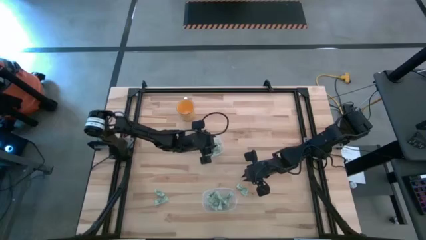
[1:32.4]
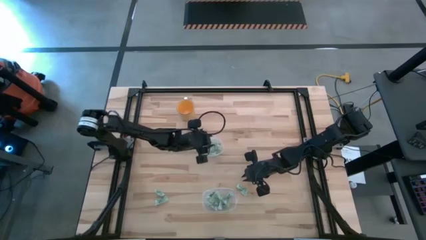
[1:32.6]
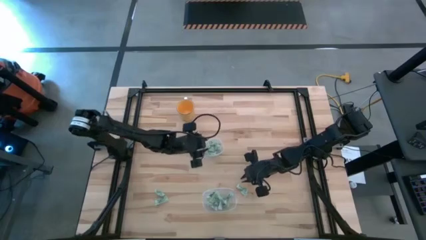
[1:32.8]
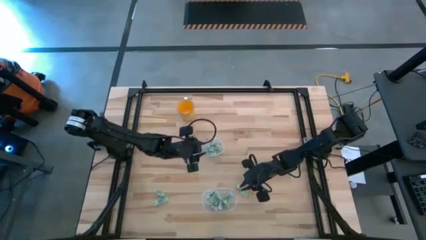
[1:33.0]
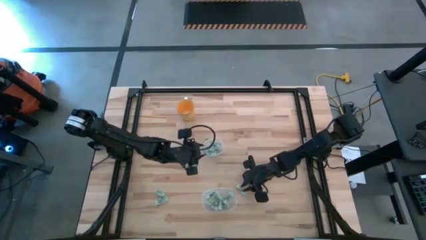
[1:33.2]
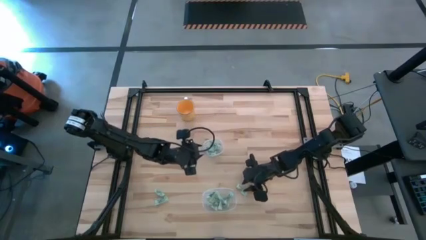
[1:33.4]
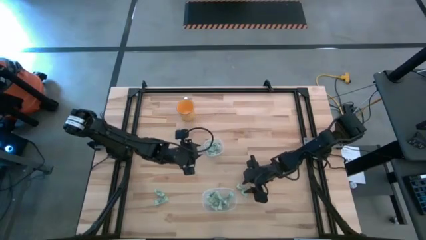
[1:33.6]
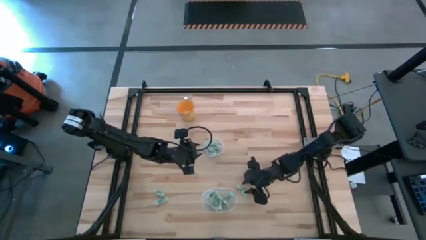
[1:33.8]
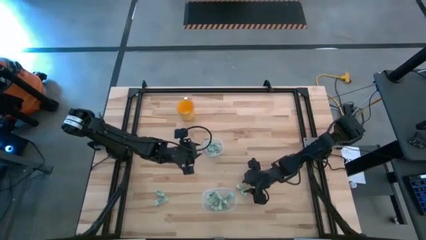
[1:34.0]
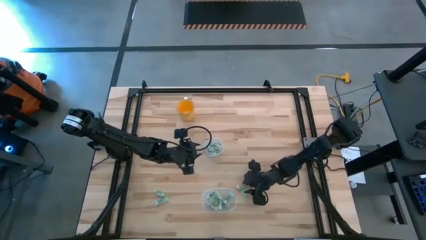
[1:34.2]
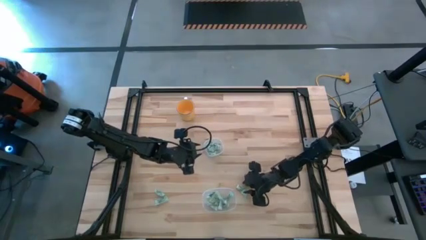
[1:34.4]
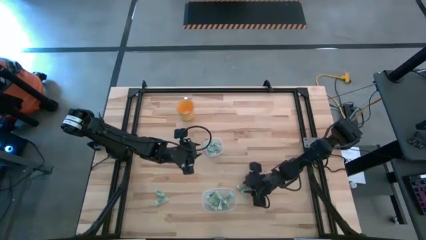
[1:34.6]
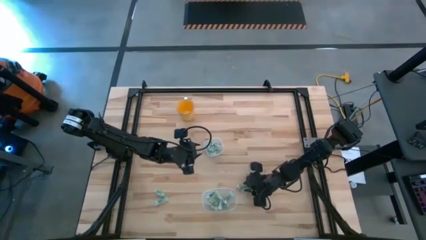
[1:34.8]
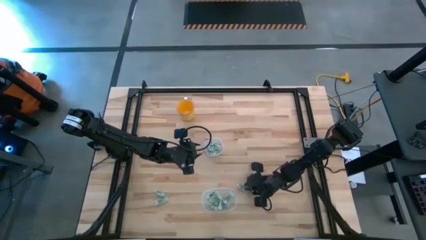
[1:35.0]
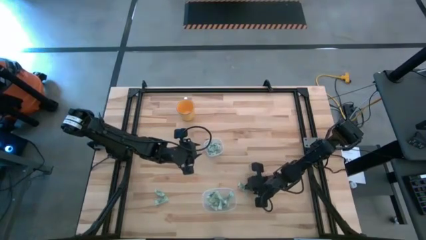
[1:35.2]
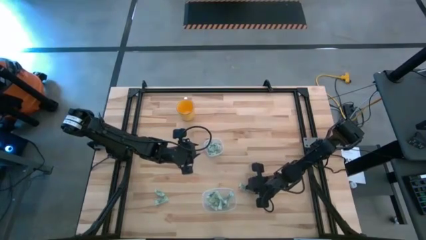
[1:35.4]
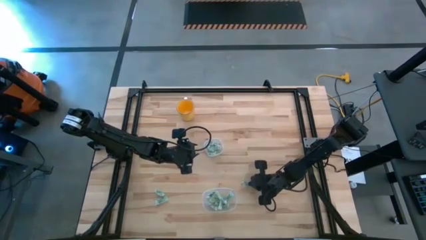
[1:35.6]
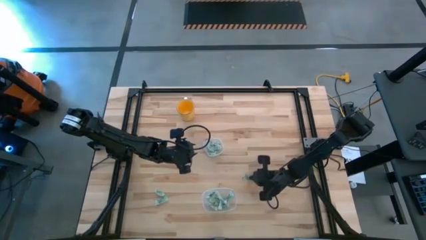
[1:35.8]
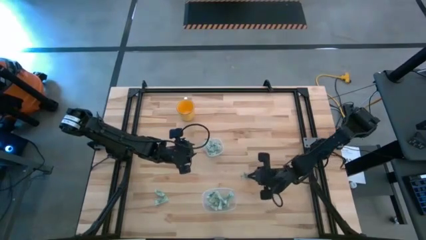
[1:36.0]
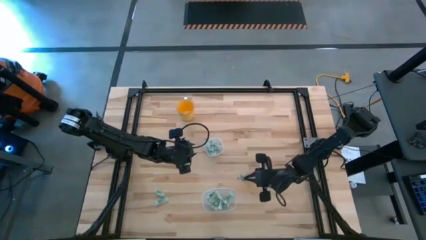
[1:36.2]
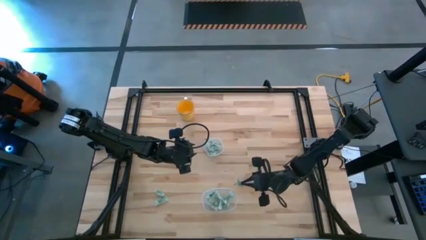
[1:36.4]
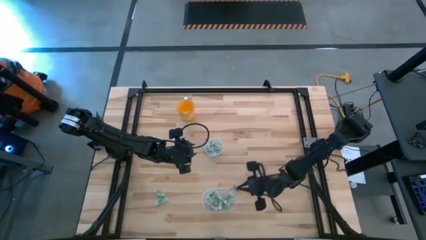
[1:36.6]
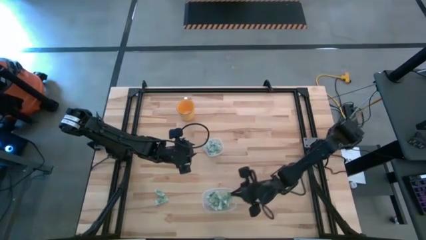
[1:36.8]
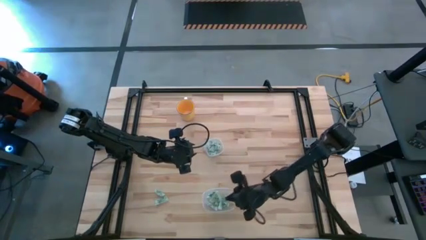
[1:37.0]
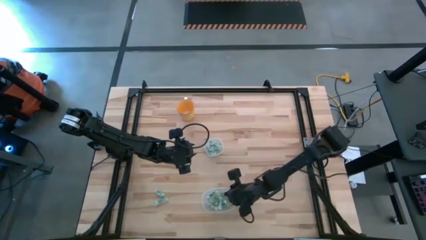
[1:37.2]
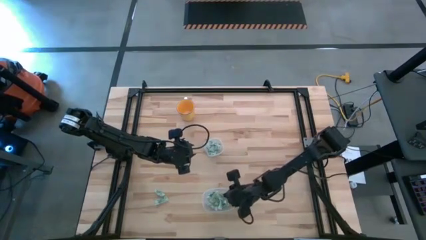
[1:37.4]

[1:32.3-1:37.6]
Put the white stevia packet into the bottom transparent bin

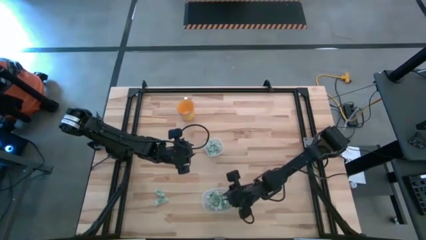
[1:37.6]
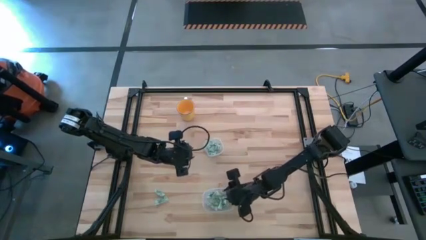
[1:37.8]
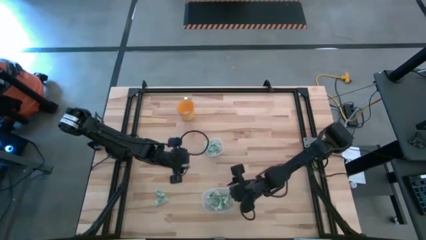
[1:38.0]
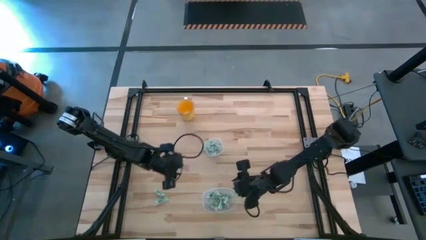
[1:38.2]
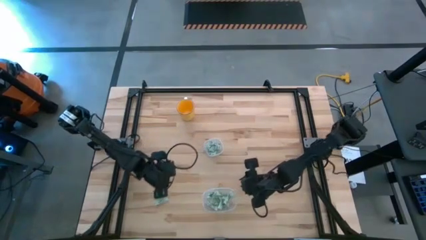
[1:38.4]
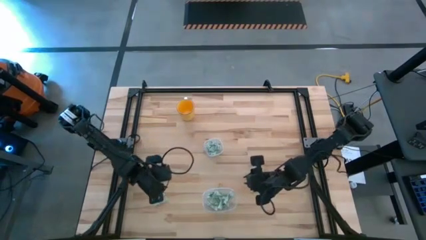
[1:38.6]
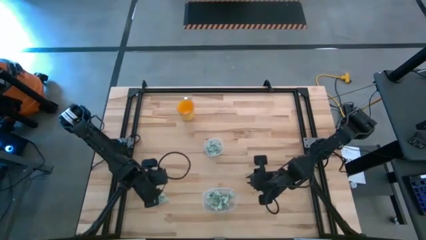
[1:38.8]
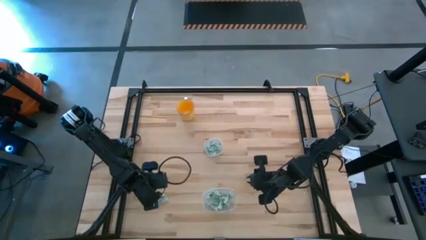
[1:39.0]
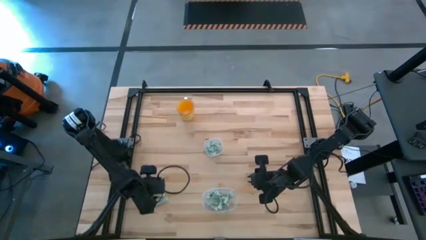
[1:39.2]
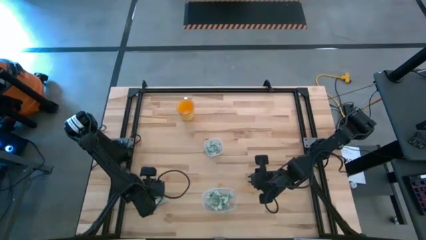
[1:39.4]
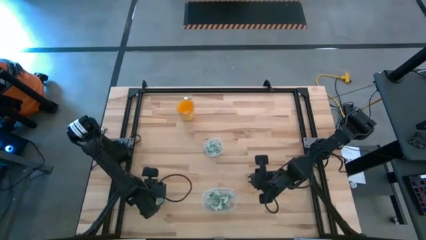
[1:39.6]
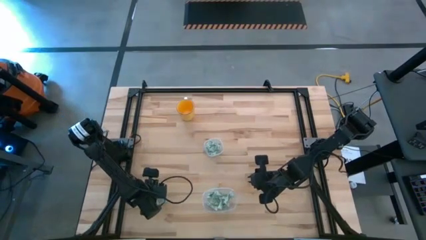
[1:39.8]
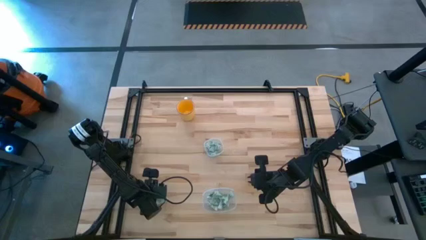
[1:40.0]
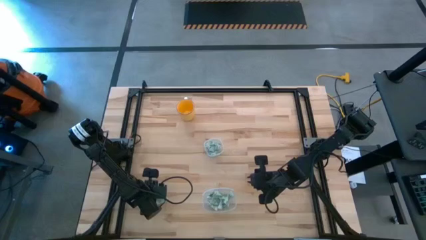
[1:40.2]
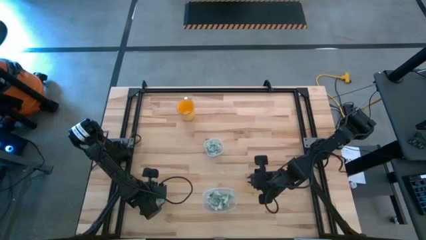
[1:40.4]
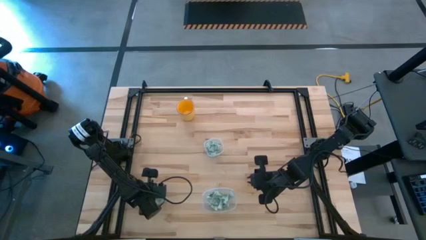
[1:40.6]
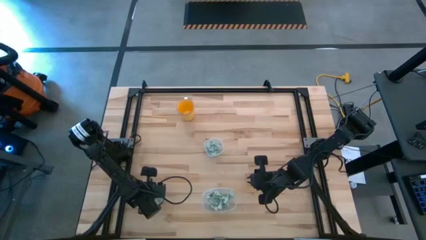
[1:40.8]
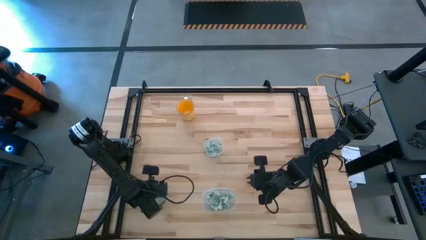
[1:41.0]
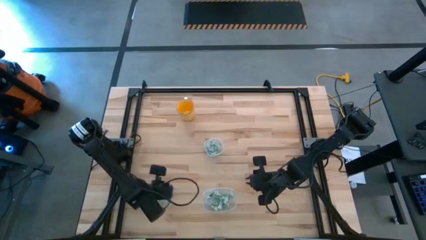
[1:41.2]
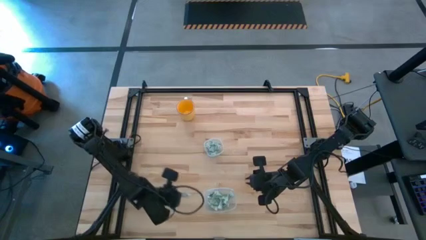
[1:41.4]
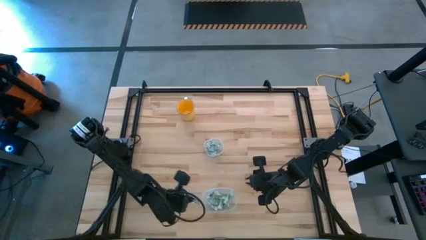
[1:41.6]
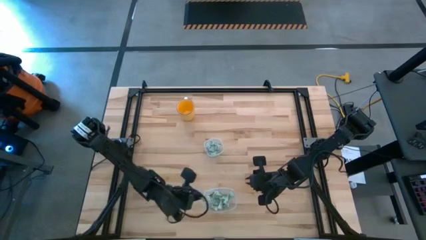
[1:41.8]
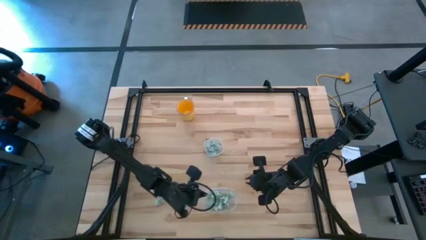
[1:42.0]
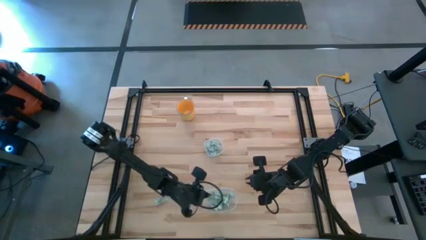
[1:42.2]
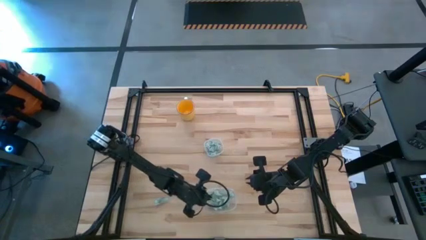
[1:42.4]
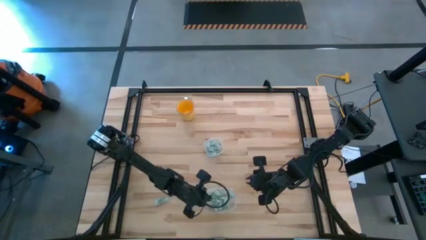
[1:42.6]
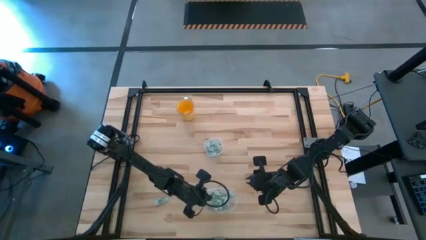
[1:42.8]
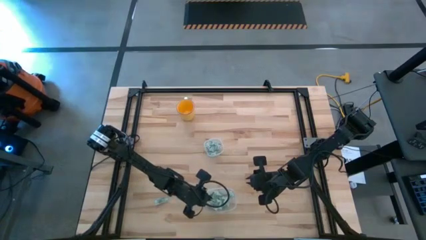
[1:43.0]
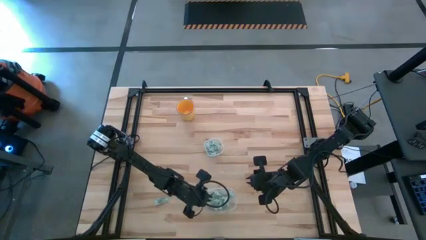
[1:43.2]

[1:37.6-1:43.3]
Put the white stevia packet into the bottom transparent bin

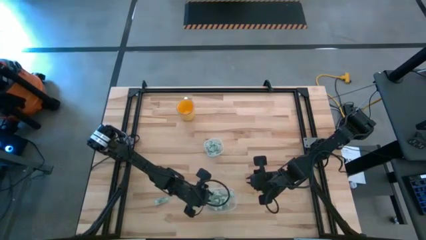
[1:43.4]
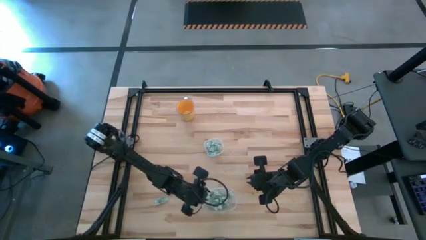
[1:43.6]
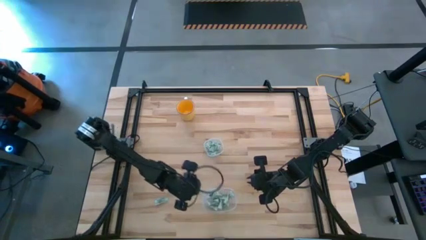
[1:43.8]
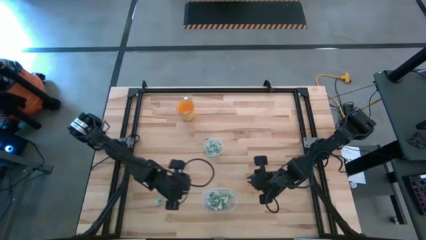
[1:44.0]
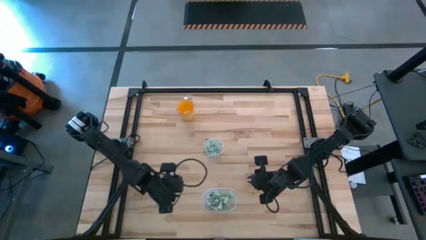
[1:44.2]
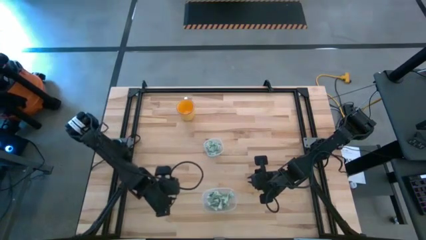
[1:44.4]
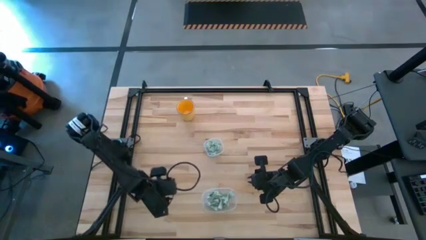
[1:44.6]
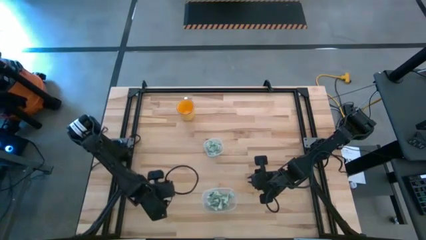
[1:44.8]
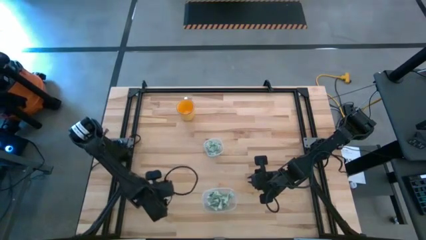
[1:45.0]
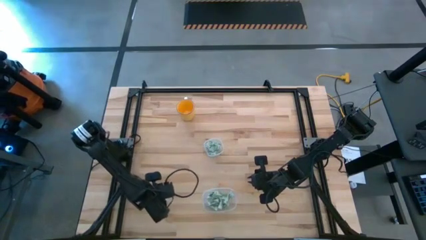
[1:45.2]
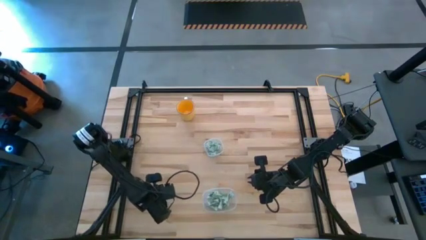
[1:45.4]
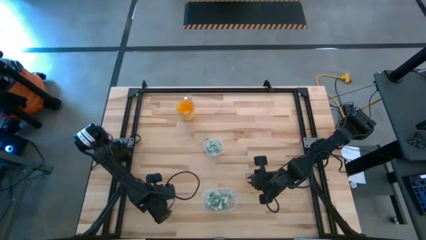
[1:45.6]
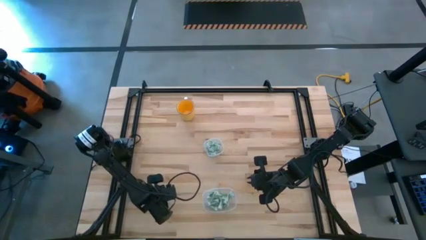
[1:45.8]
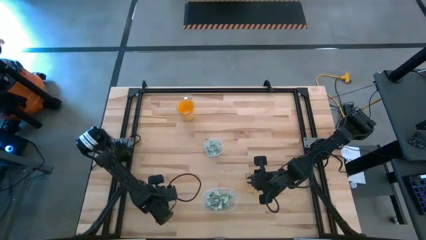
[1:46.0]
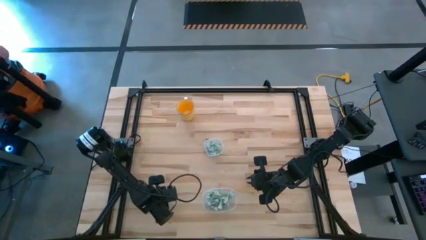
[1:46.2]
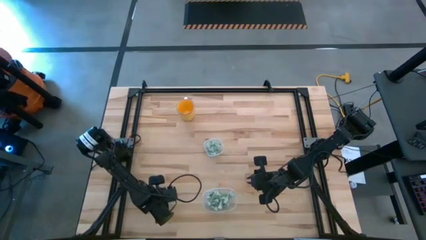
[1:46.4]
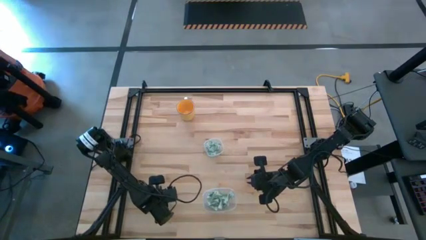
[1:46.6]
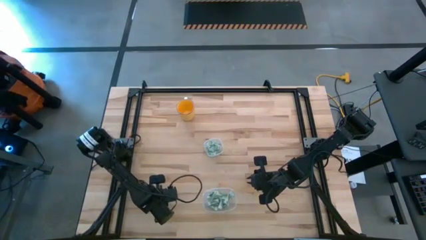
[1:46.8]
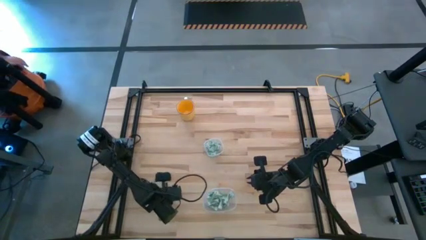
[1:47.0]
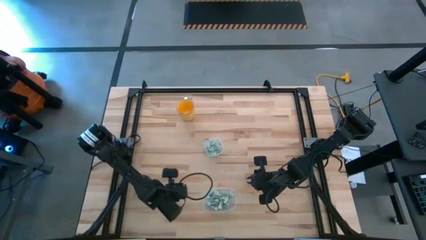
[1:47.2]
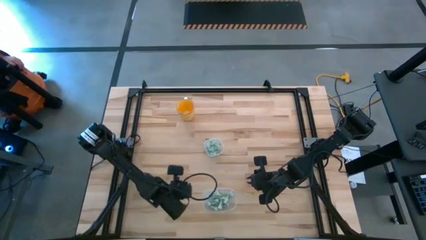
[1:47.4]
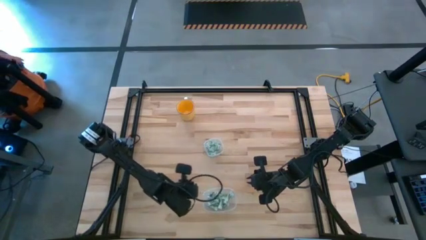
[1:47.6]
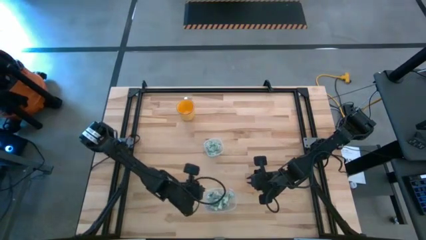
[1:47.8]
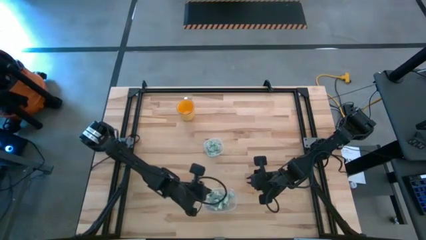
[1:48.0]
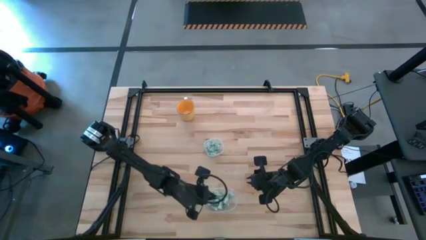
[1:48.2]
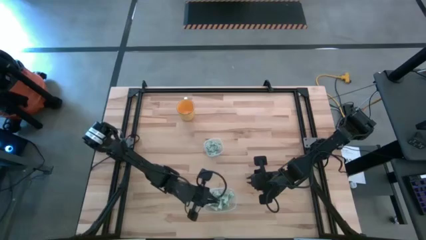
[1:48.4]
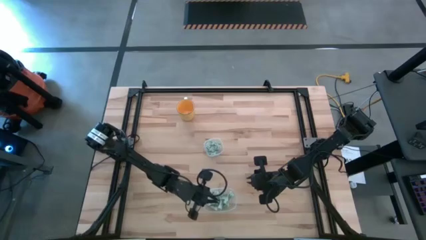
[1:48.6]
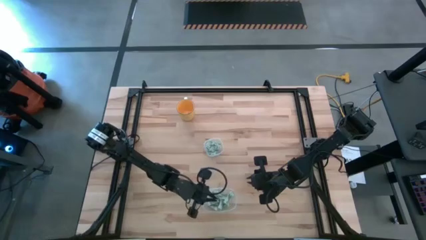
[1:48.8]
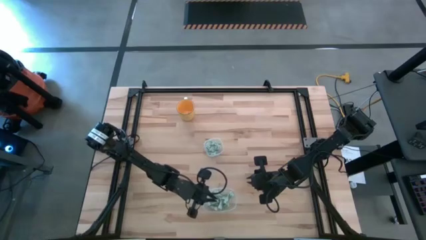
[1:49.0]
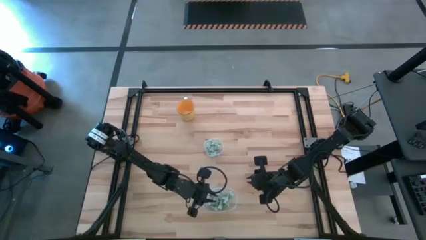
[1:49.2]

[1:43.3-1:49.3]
Put the white stevia packet into the bottom transparent bin
